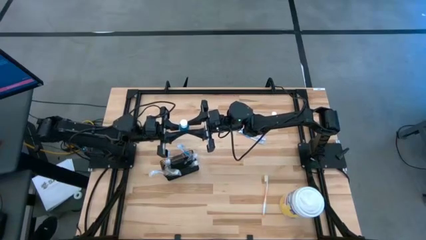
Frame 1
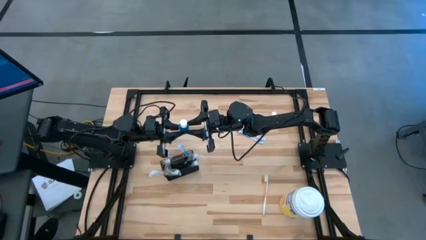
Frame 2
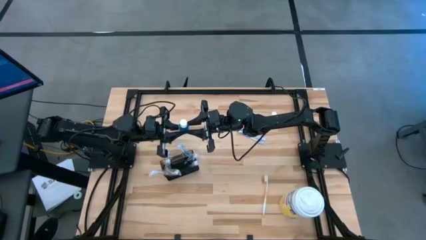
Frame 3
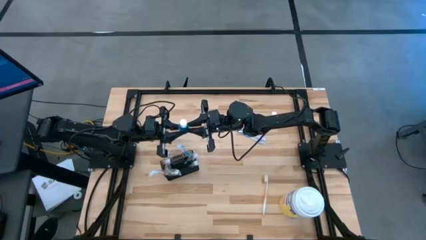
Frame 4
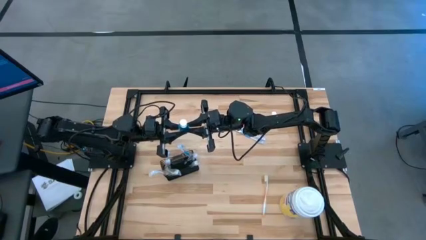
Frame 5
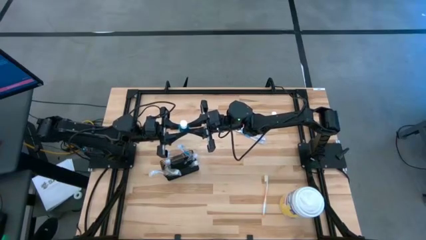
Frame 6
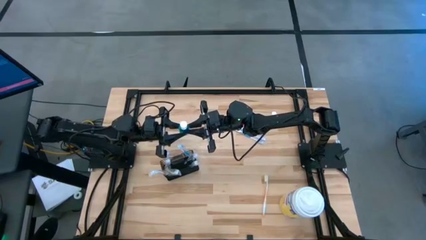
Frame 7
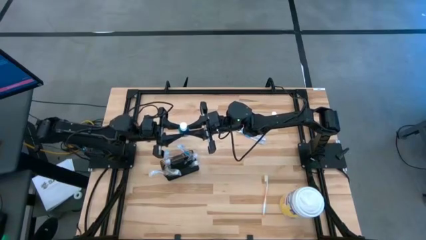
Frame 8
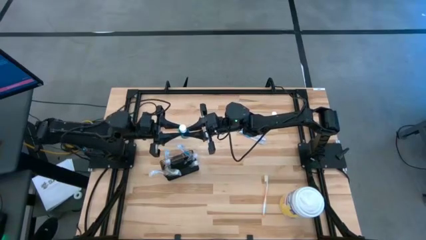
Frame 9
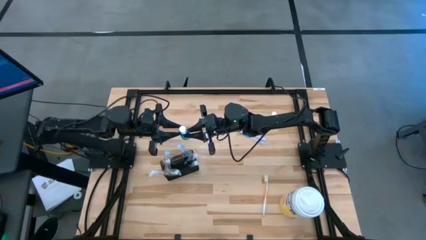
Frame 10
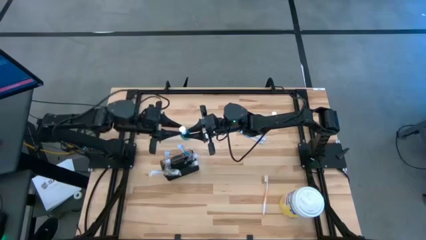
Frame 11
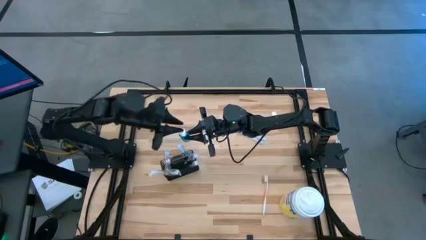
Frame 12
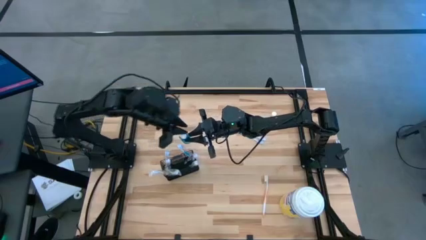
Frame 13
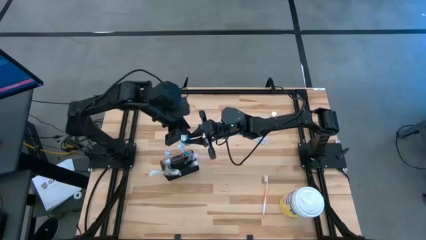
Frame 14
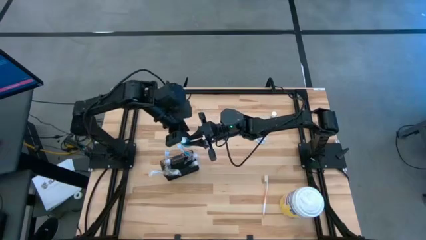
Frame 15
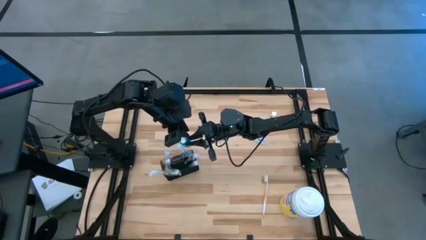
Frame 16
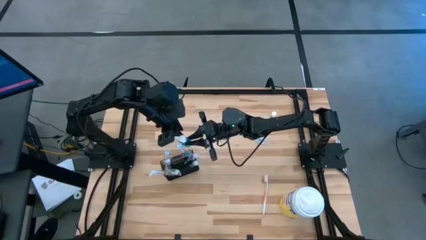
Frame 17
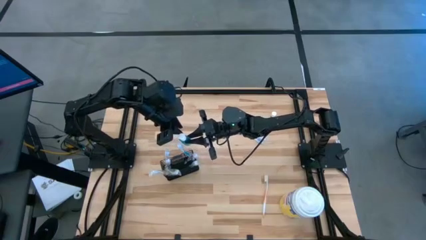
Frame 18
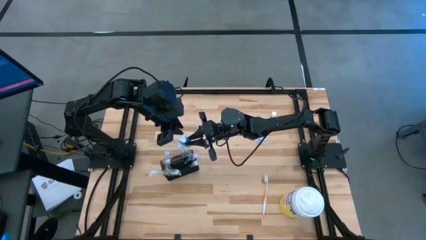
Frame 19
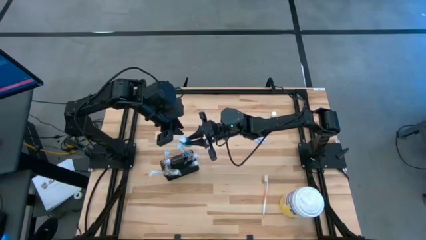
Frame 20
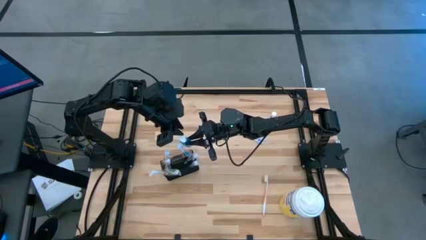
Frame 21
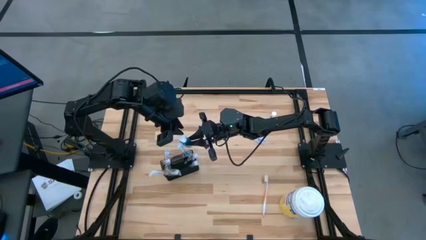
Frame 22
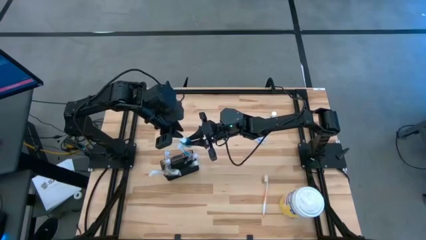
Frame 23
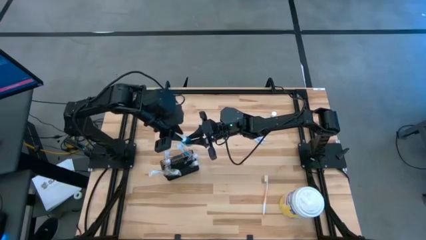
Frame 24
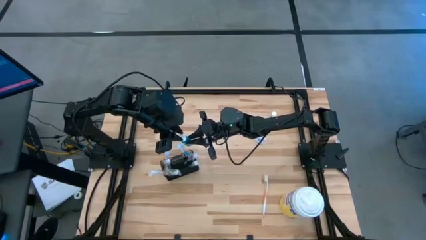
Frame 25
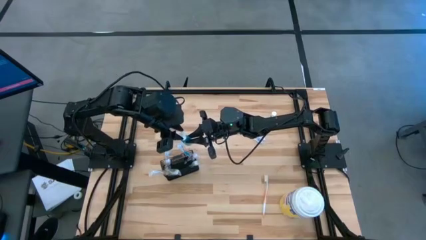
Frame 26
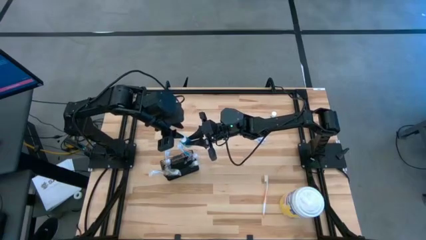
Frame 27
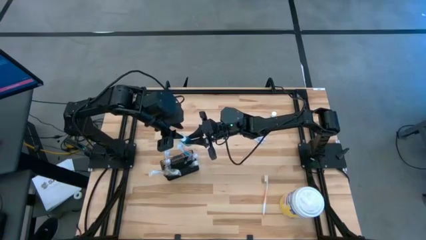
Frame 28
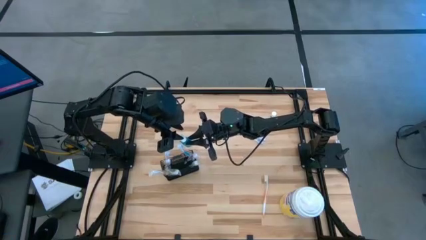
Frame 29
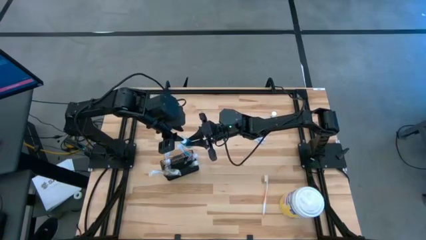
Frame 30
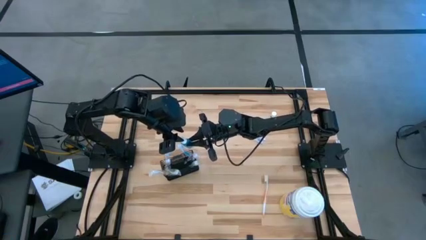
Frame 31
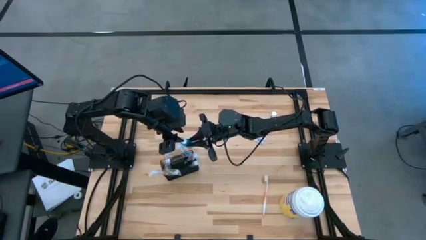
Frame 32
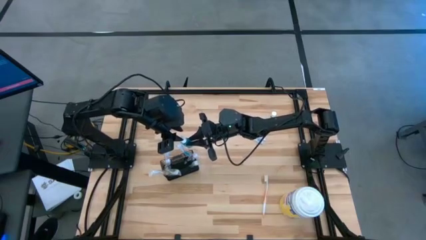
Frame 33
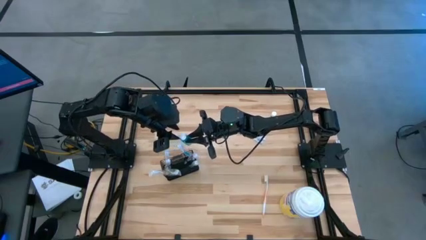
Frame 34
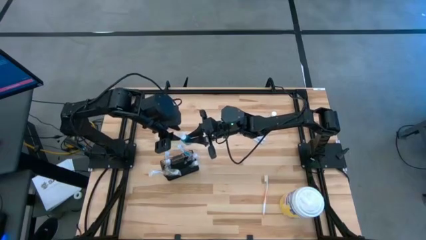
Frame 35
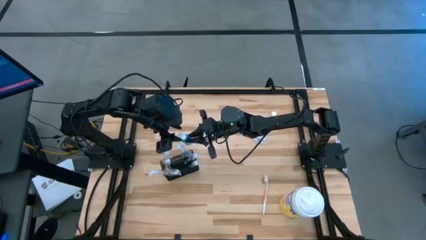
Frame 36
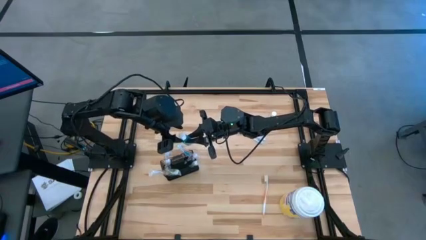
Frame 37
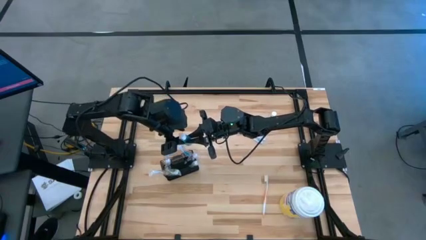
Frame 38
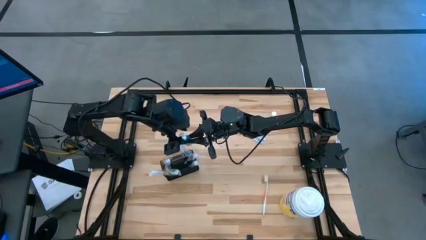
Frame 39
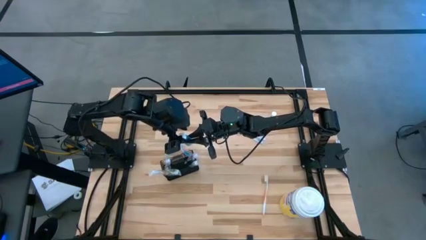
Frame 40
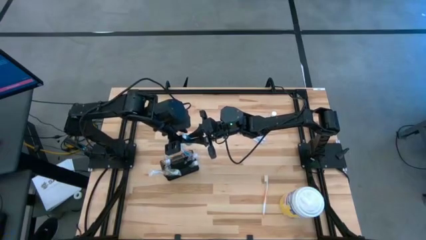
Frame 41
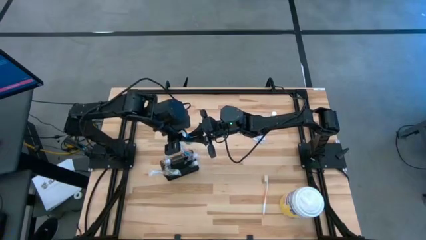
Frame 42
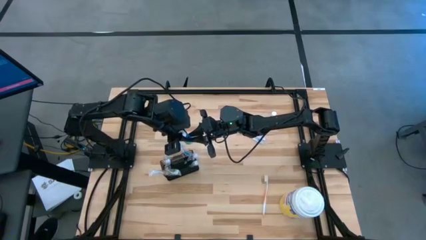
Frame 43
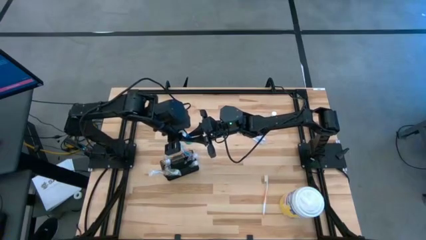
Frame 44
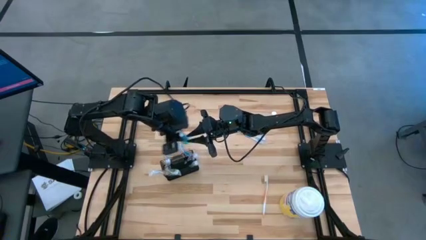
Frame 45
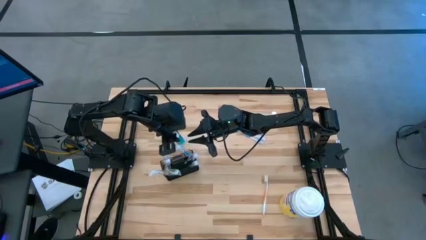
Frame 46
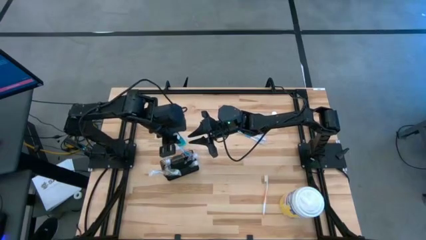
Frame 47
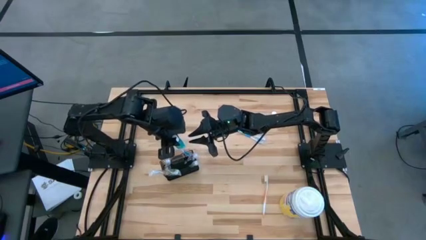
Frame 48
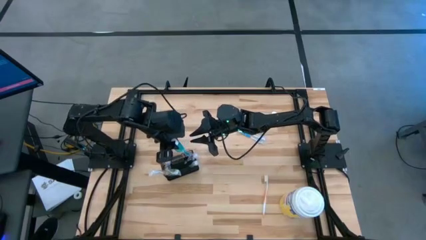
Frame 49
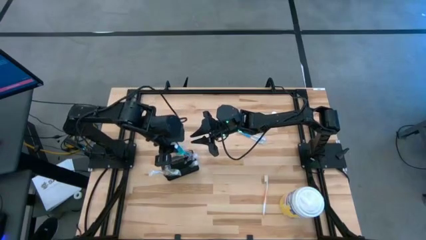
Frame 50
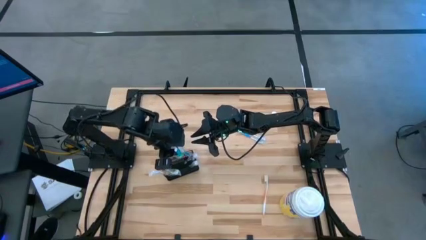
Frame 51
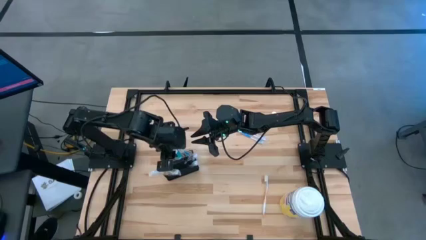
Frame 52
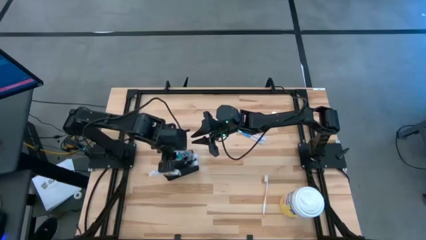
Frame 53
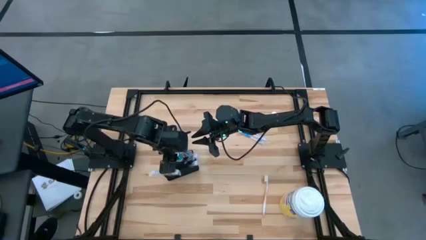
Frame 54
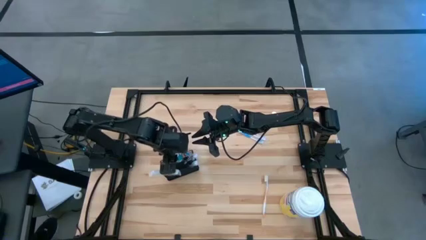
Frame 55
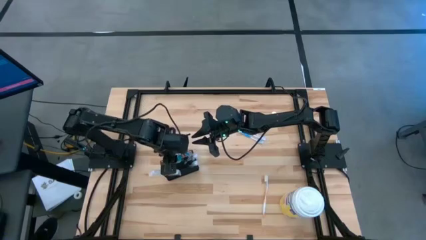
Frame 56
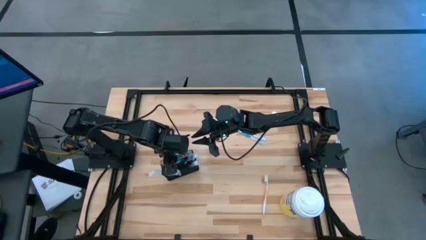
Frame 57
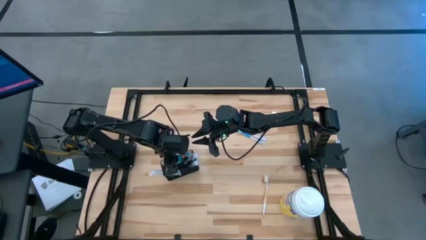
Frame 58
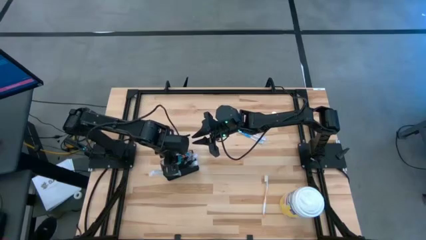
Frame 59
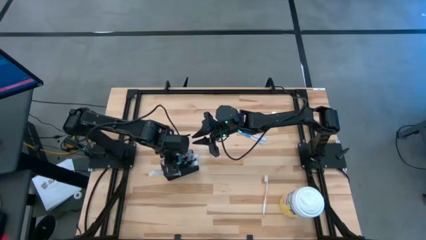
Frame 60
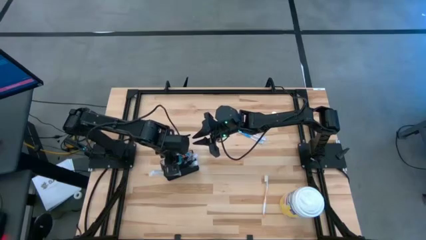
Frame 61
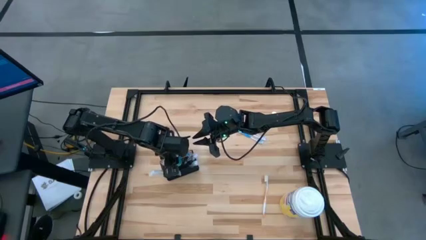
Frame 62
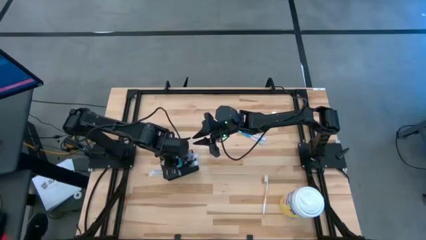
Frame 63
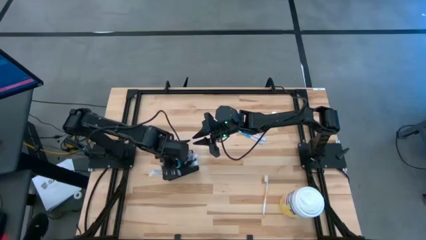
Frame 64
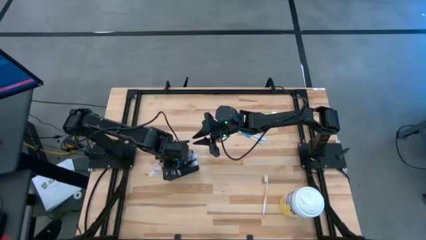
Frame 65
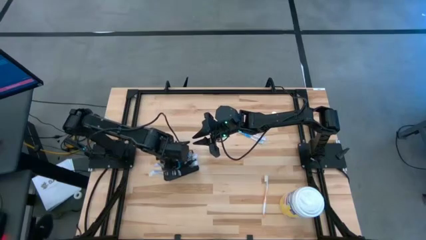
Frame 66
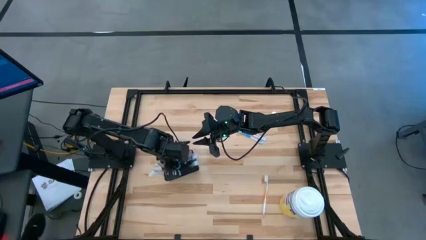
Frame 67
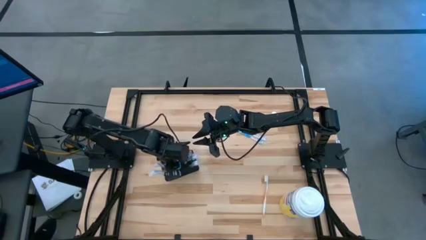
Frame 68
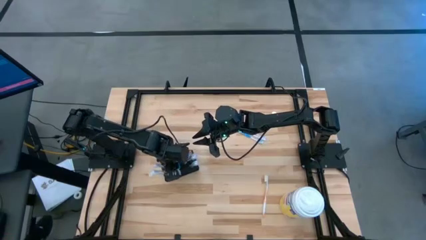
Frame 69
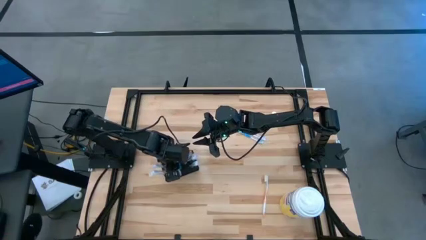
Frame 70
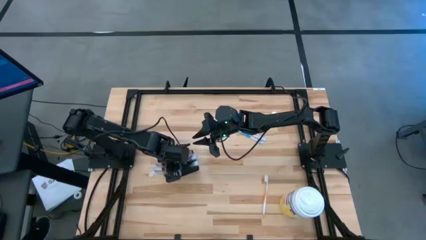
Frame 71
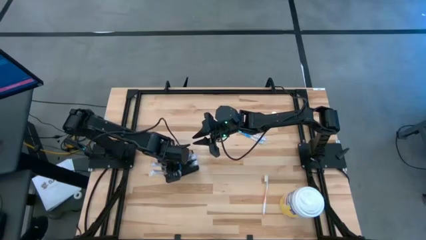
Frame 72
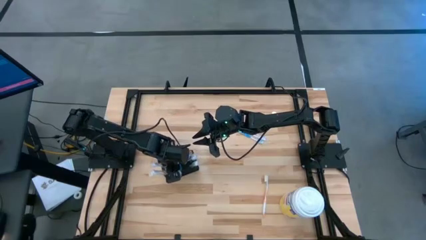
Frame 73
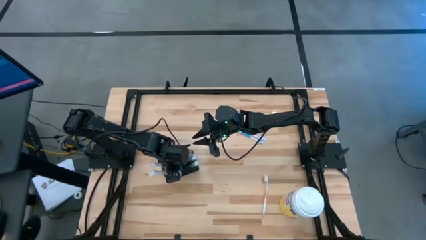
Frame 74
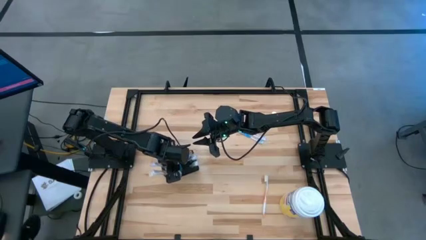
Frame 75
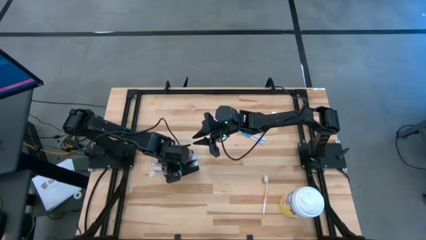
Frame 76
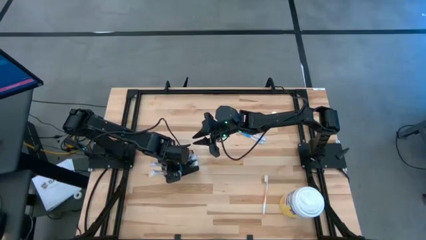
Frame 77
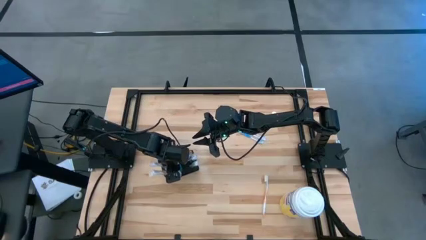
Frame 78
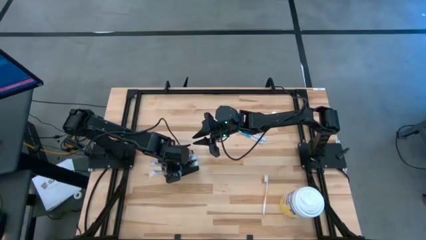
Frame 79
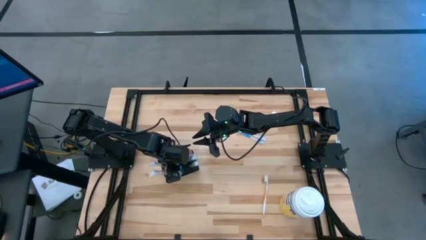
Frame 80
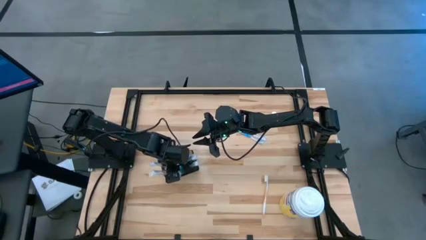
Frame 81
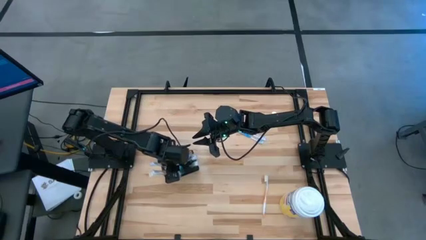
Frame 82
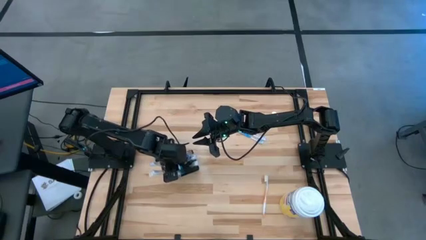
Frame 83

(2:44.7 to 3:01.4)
Task: Pick & Place toothbrushing station
Put the left mouthwash into the middle section of the mesh organizer
